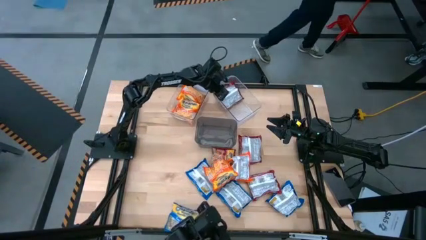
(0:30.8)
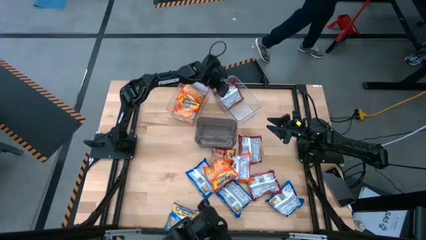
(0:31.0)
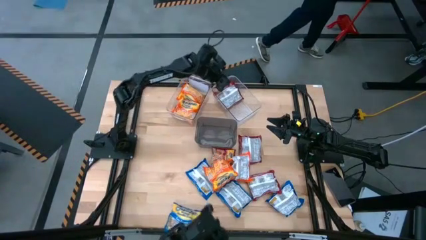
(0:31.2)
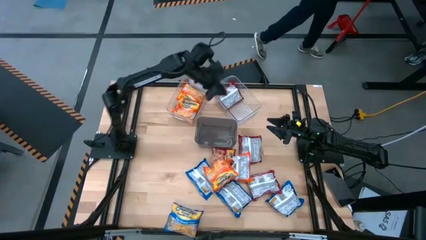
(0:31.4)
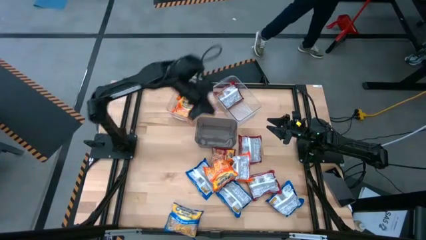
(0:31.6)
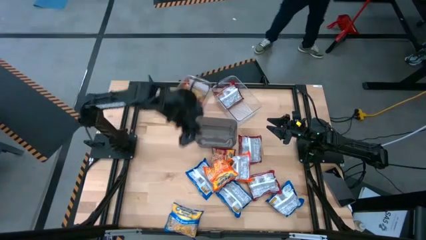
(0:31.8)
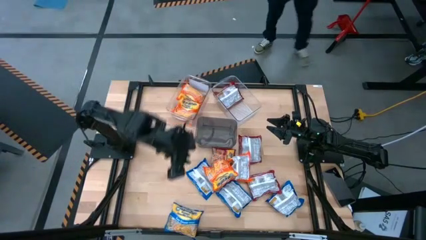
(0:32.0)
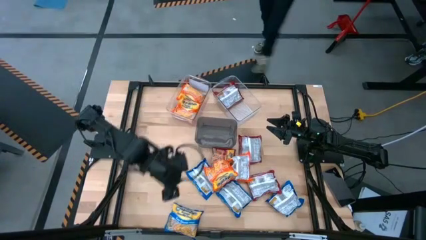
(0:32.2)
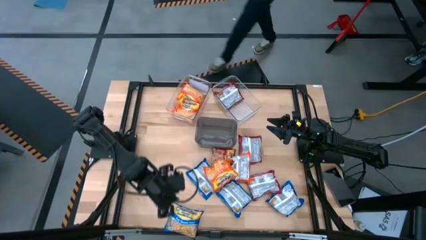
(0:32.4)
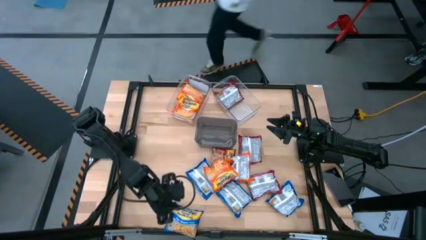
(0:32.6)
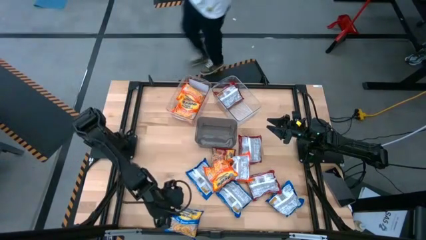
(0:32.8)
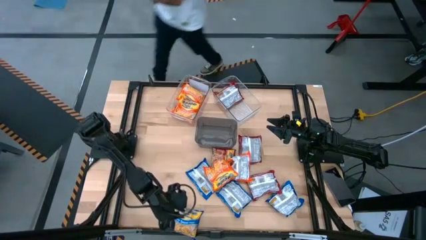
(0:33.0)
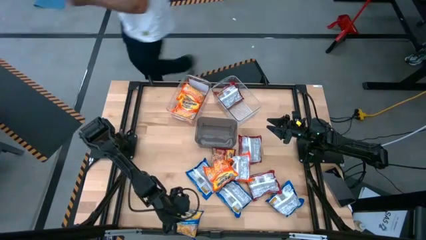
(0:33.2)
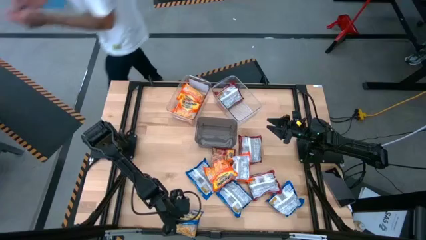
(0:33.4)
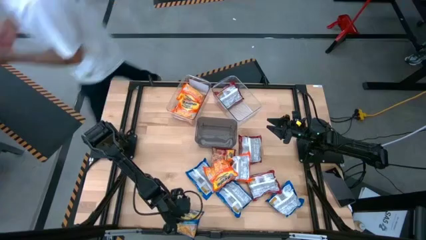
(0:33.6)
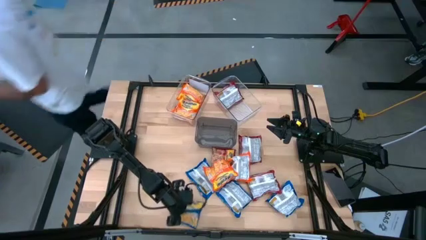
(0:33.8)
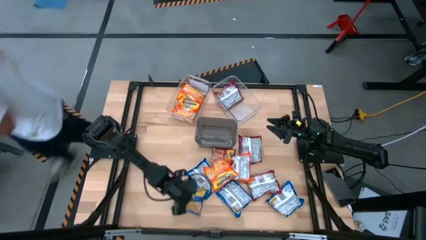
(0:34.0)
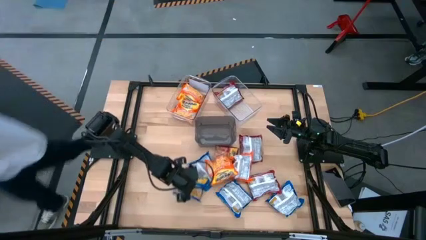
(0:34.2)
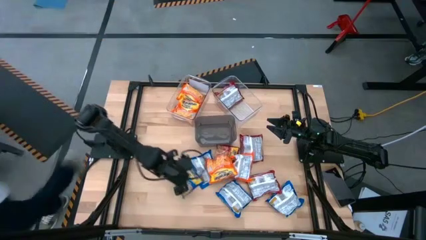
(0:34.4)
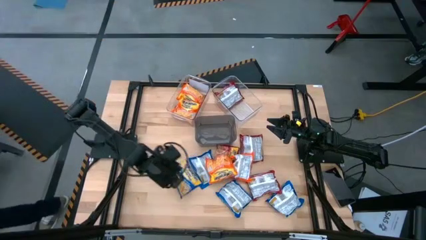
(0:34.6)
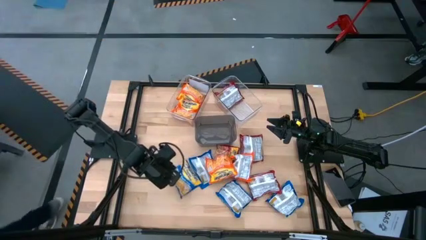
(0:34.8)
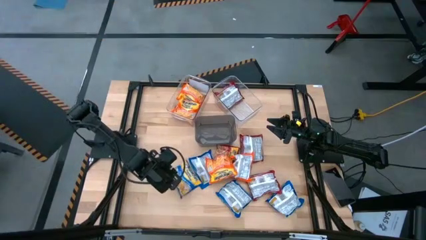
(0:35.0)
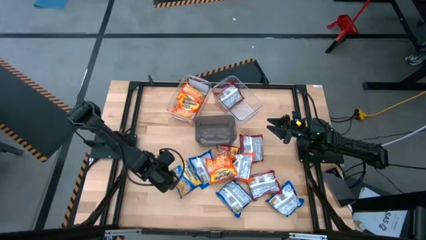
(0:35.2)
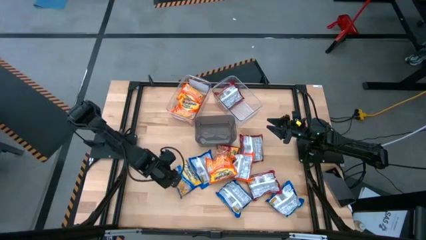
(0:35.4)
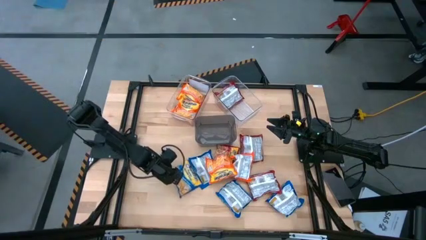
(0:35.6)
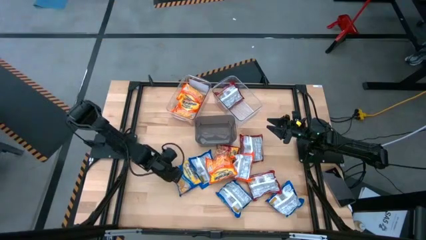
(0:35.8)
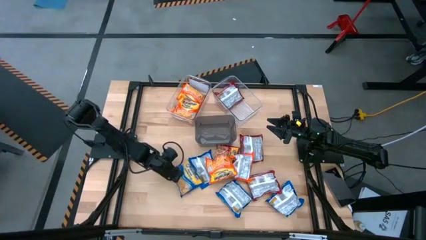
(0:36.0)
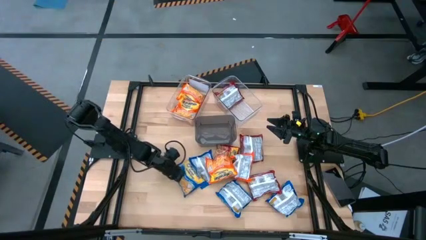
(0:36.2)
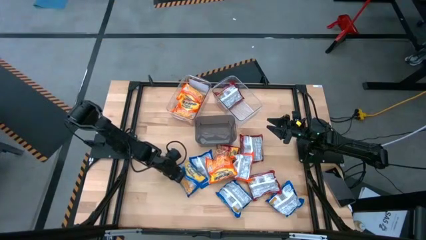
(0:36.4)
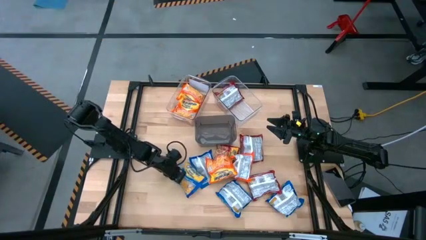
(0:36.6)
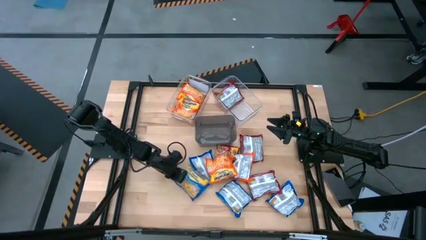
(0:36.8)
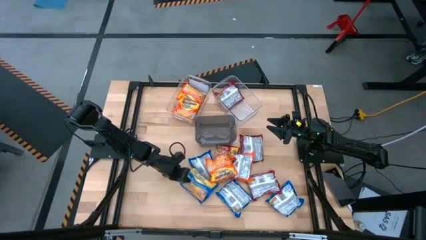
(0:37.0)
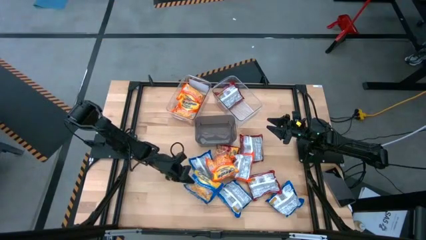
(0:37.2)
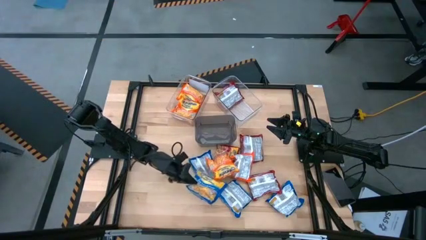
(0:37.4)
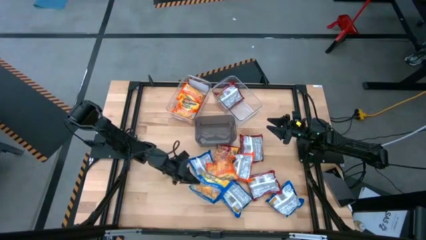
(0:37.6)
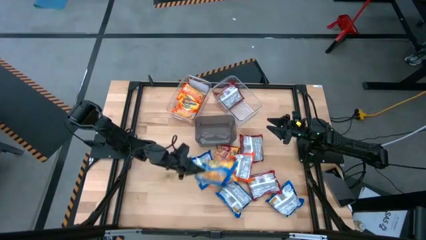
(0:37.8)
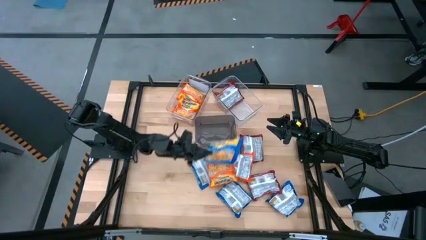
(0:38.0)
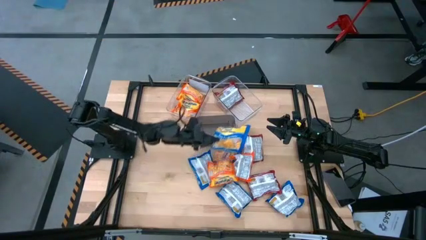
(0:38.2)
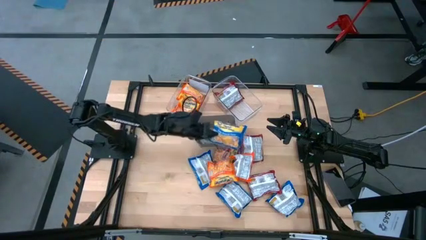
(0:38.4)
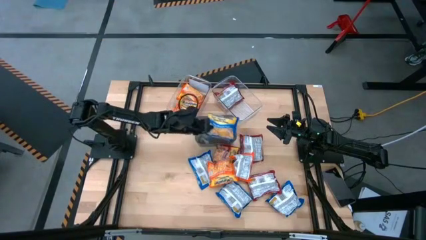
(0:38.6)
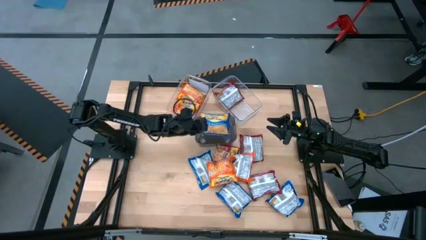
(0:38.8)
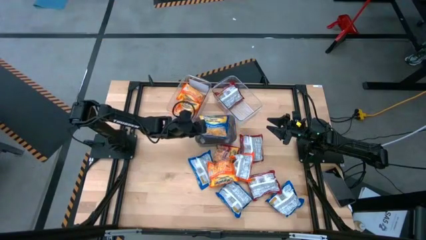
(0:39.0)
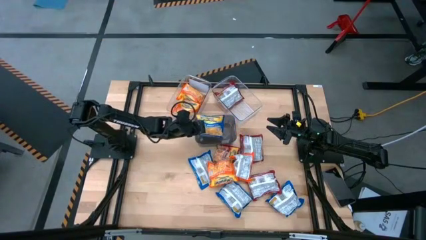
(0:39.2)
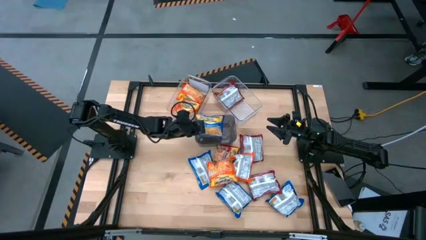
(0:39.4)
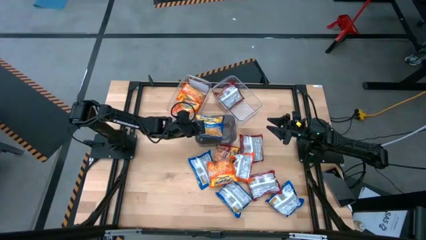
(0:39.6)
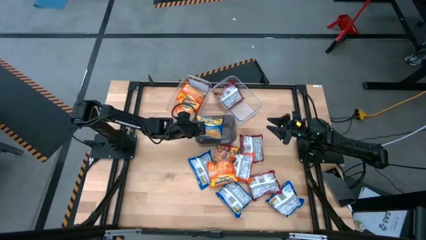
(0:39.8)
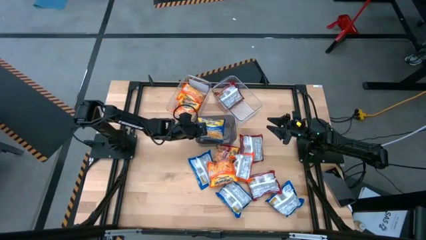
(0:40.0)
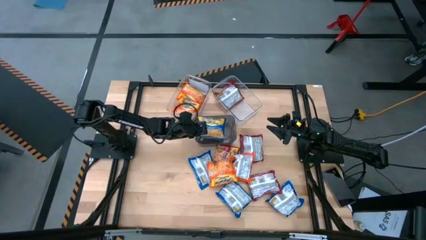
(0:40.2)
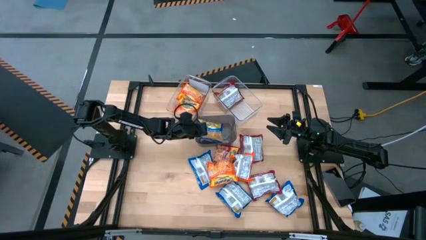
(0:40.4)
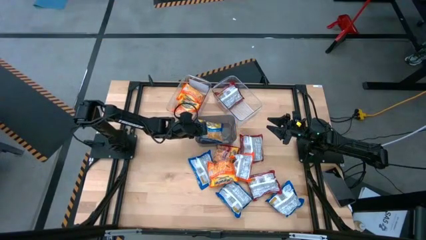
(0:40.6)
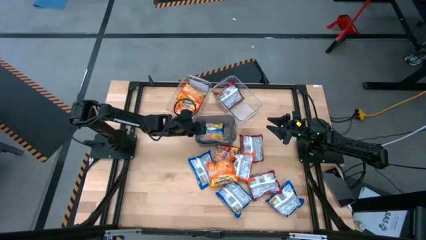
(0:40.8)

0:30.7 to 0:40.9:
Task: Sort Maruchan noodles
Put the blue noodle pack into the black transparent bin
